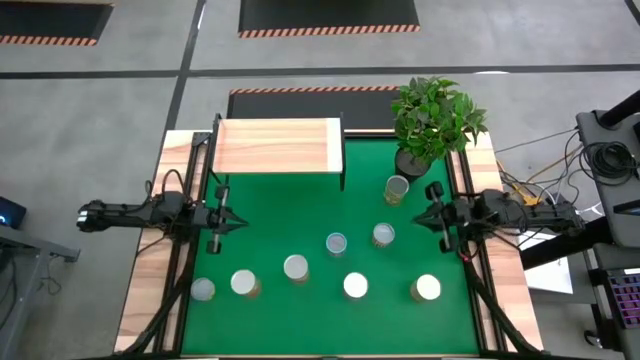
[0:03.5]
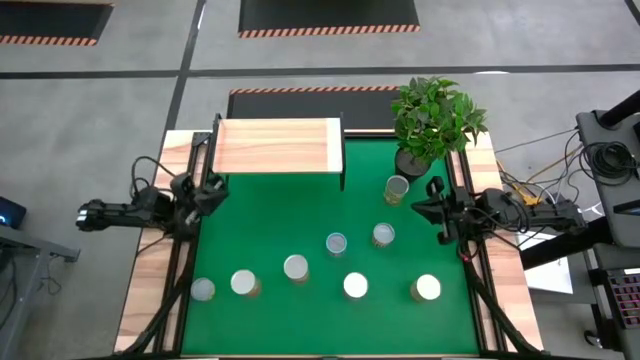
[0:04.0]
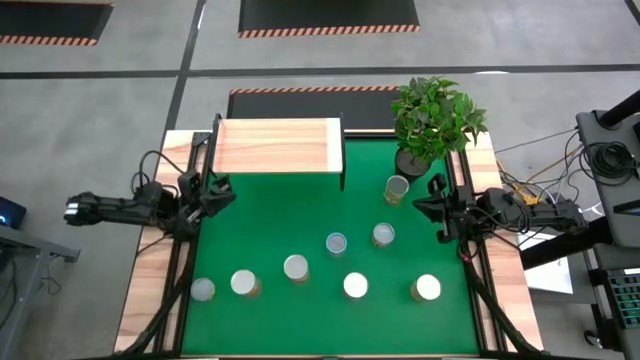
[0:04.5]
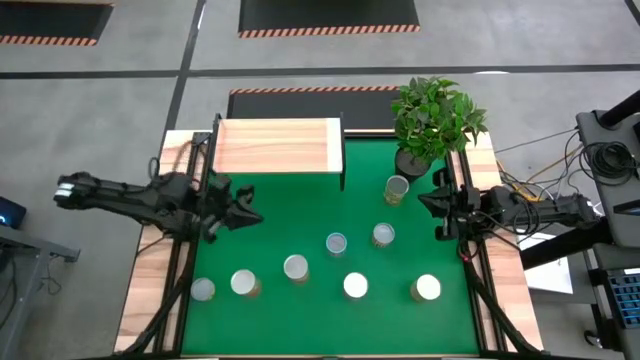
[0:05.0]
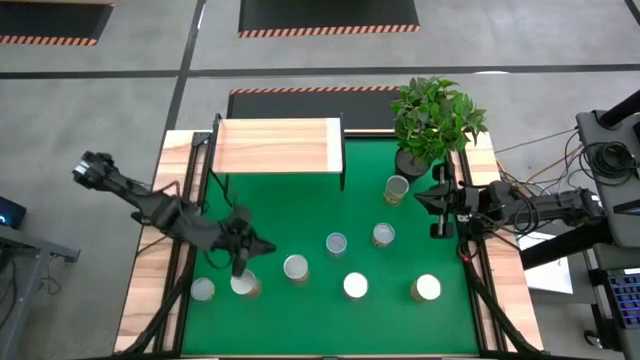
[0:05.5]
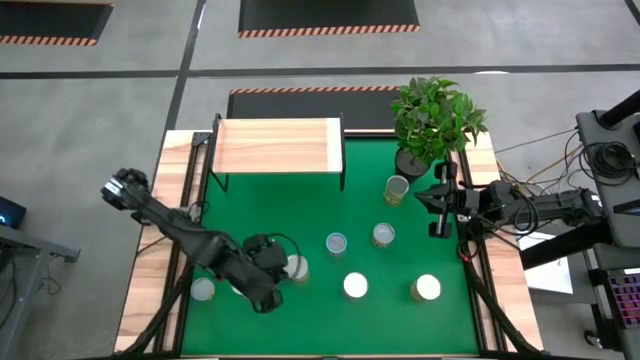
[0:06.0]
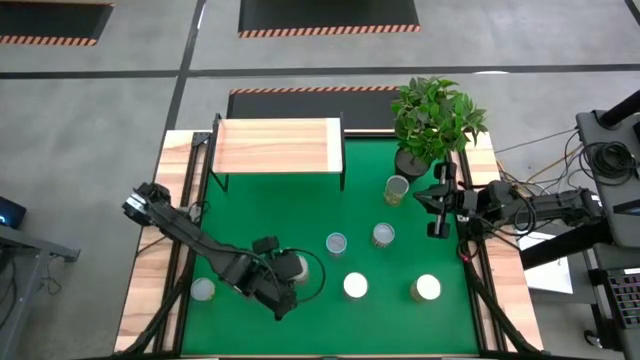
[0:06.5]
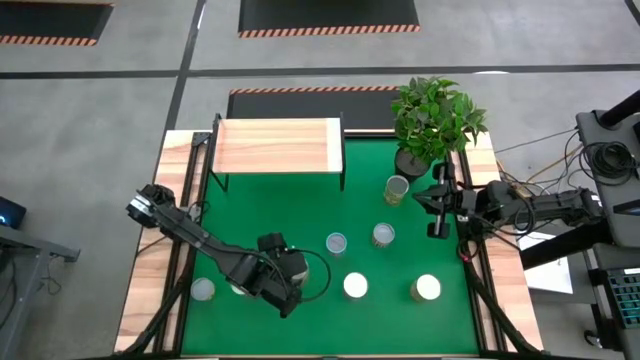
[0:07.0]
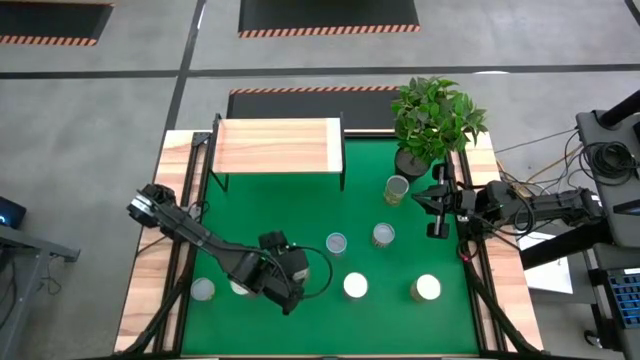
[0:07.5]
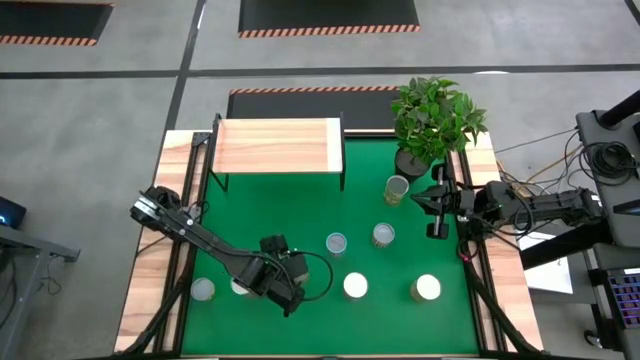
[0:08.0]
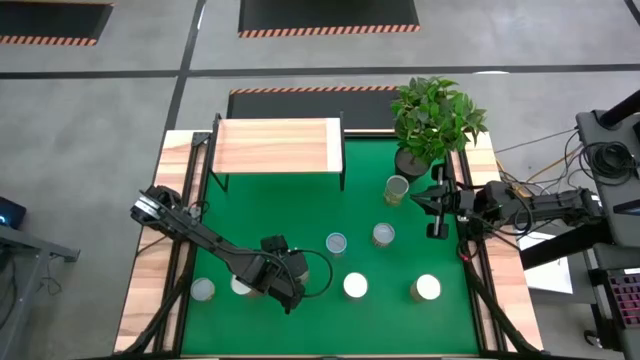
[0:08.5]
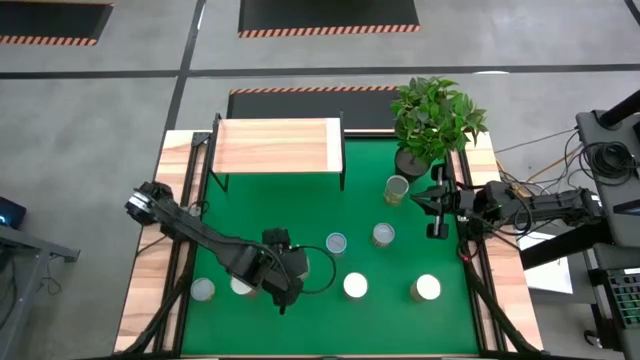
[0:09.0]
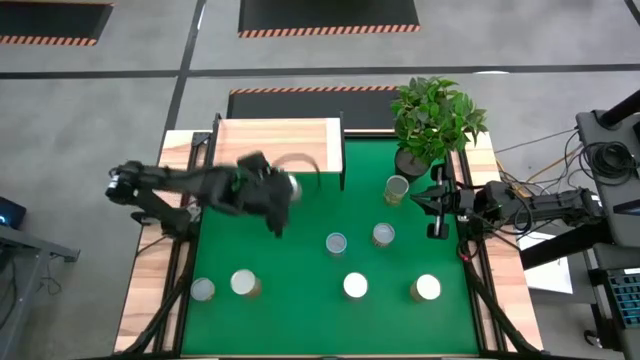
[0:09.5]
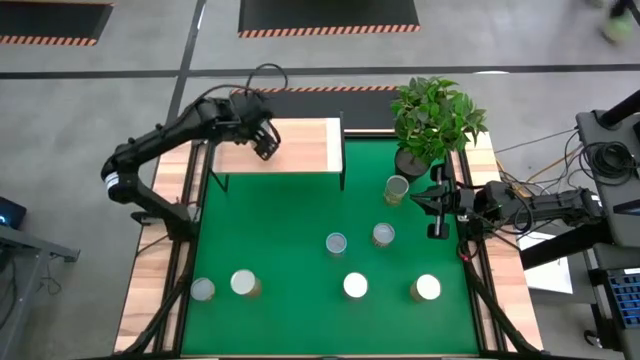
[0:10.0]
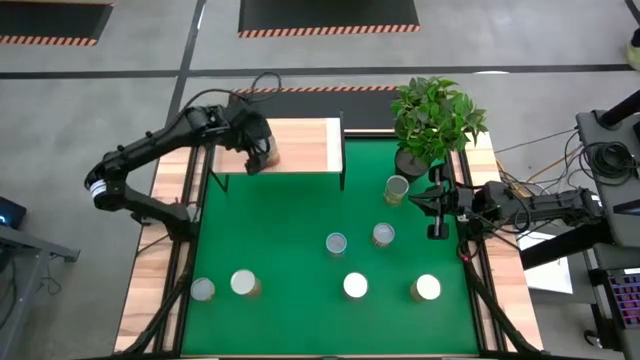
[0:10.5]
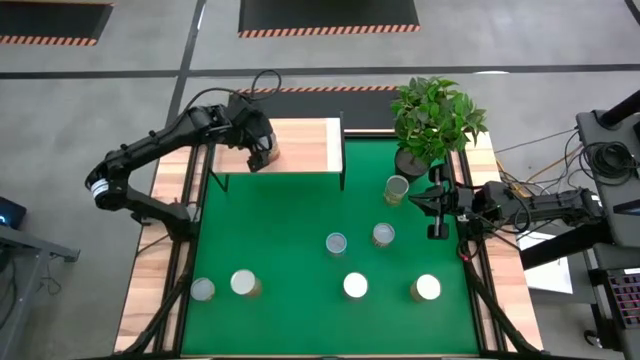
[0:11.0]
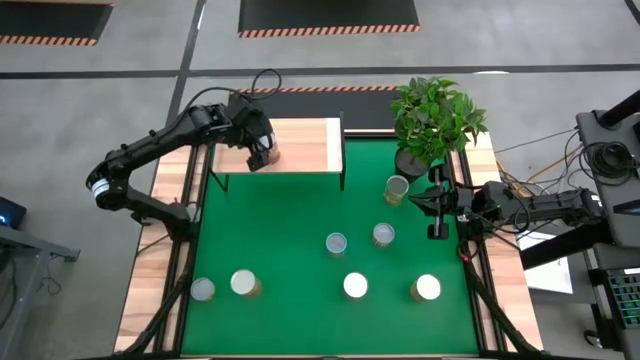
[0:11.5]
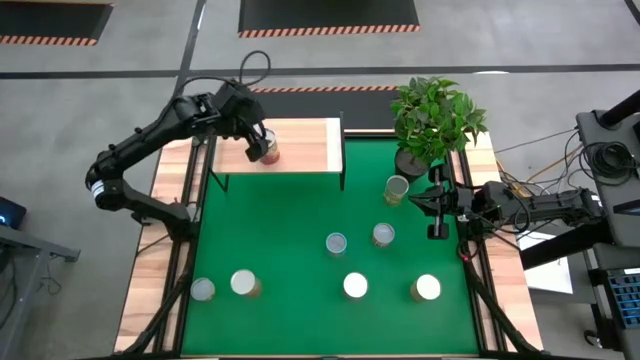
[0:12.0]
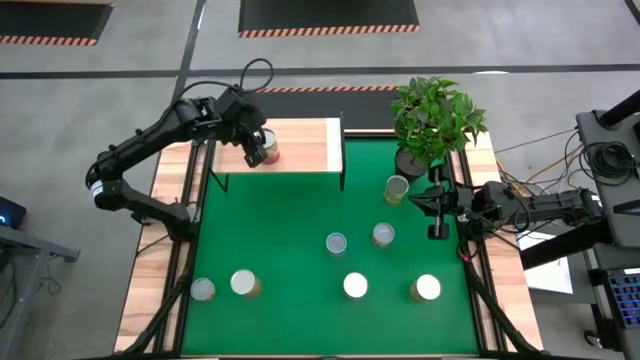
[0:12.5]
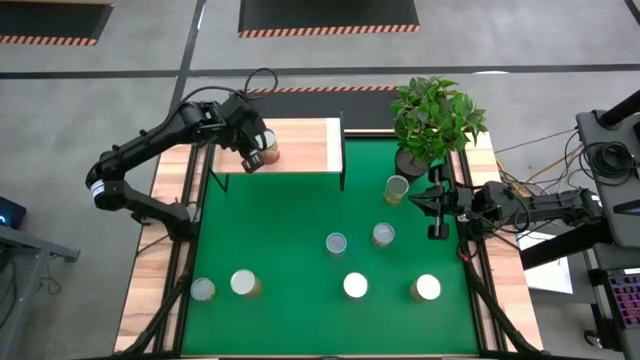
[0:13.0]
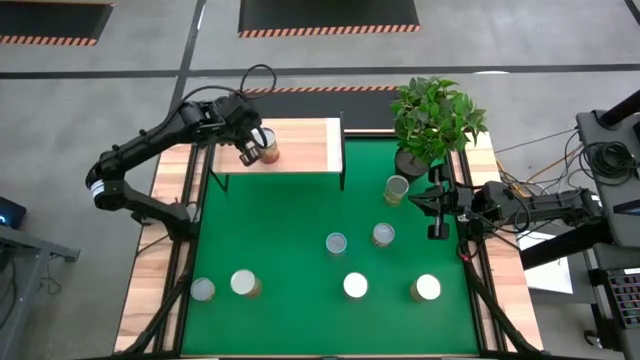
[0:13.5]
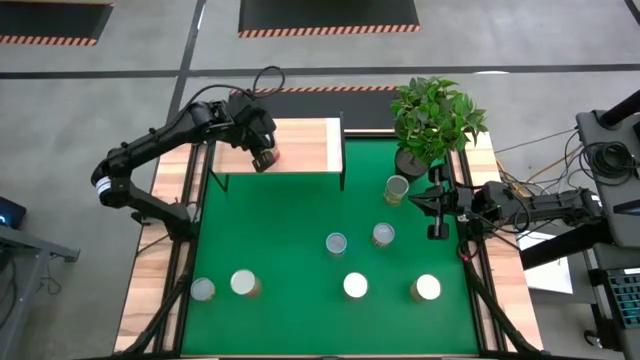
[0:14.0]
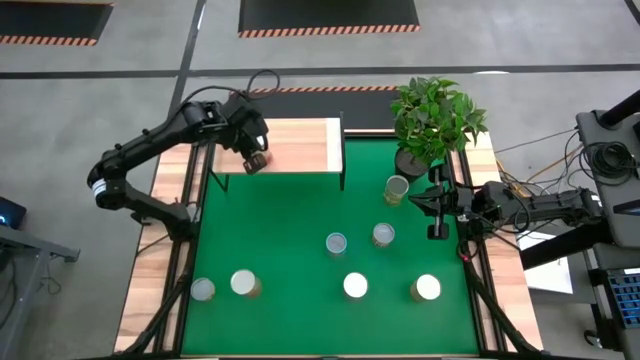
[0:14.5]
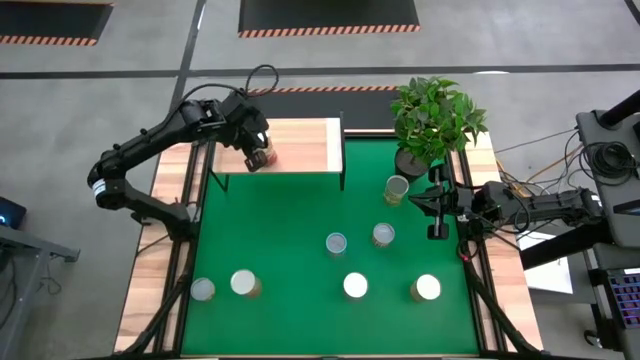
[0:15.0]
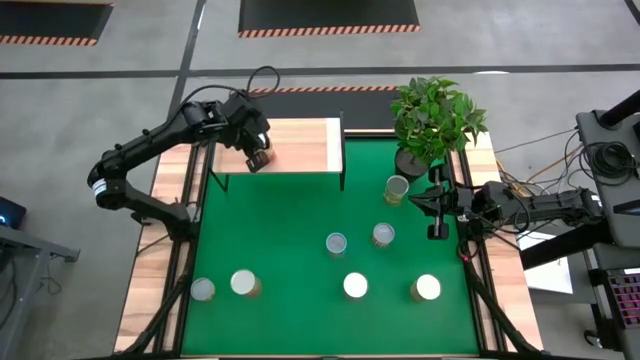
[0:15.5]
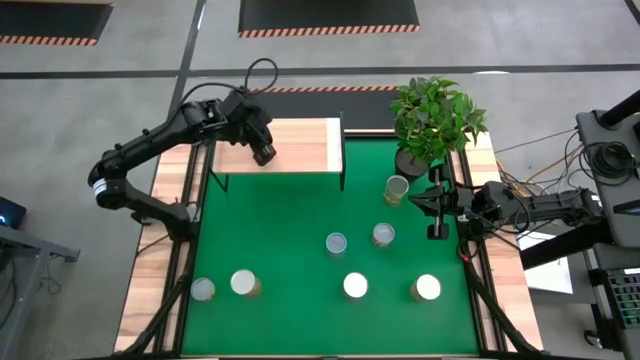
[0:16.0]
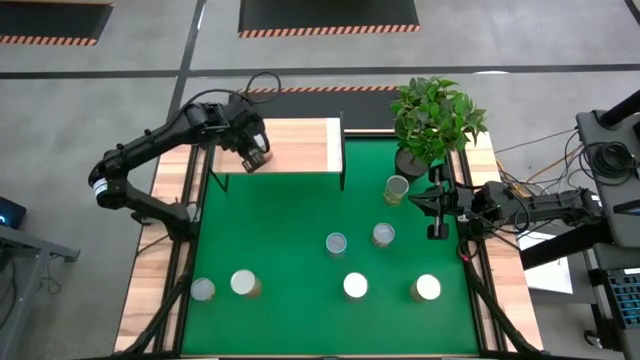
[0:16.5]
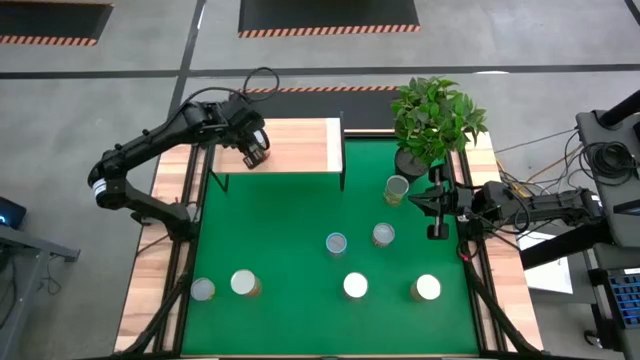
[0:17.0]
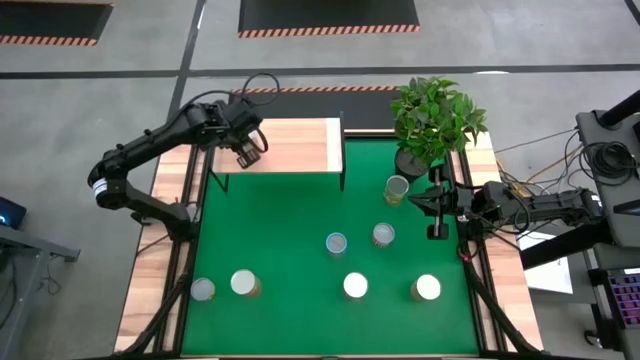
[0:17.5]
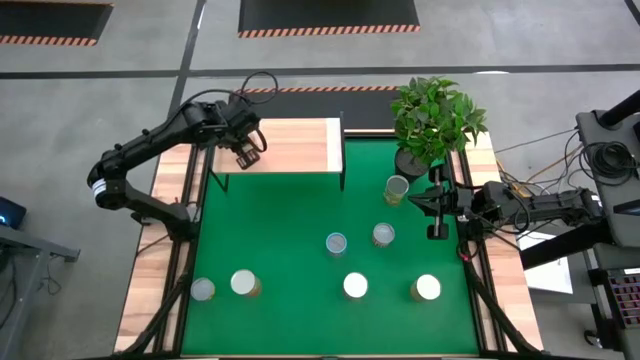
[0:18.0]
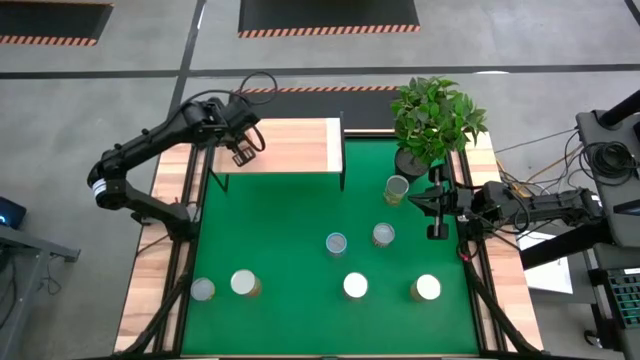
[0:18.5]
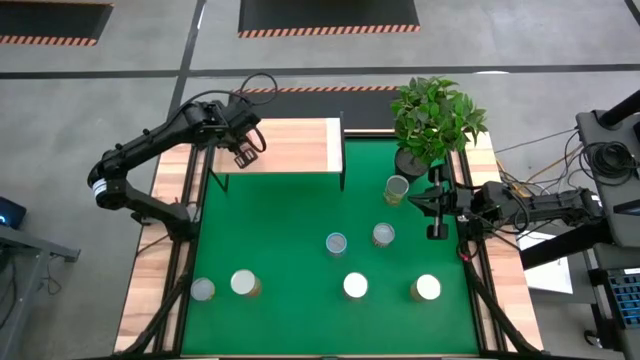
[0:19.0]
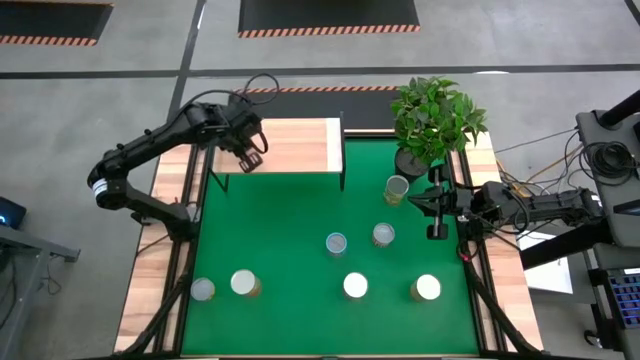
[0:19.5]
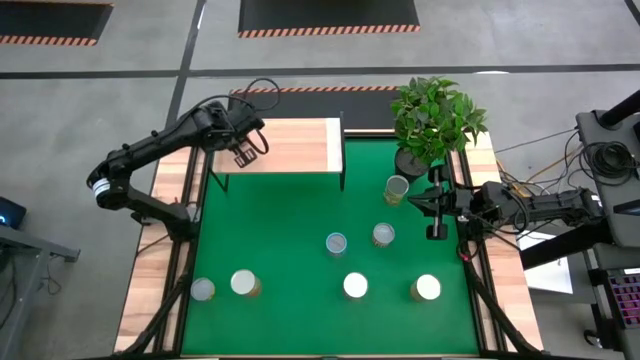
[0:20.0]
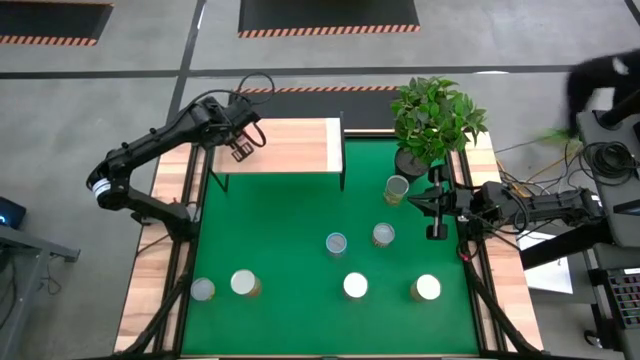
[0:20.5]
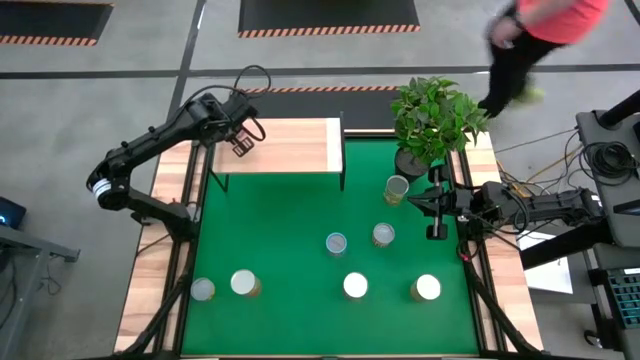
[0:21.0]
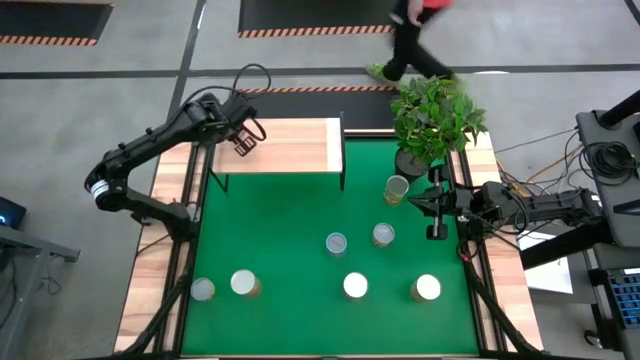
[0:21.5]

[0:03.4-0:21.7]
Task: Pick and place cans onto a shelf
Put the center left orange can on the shelf

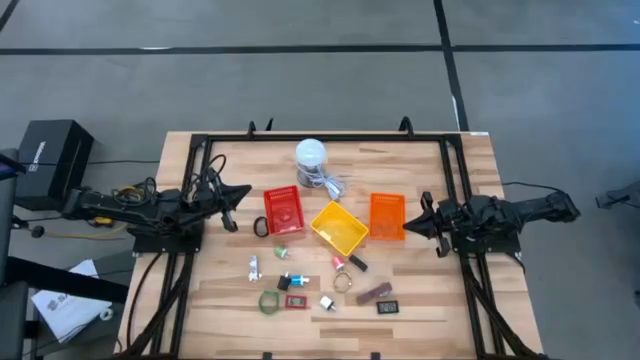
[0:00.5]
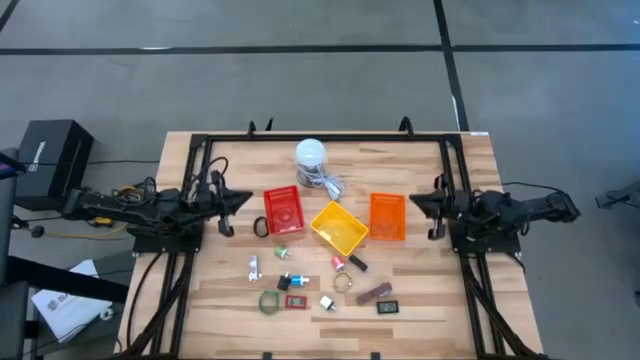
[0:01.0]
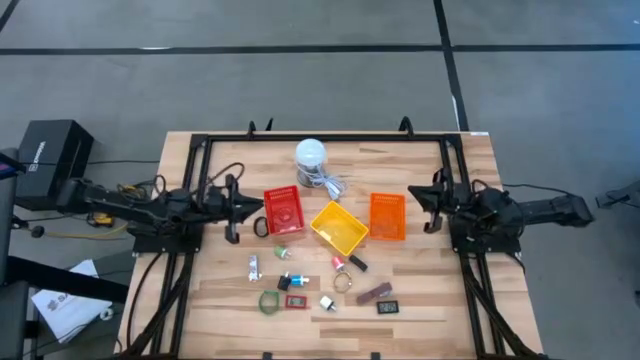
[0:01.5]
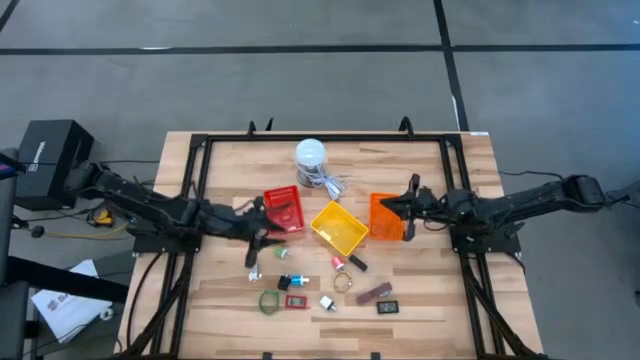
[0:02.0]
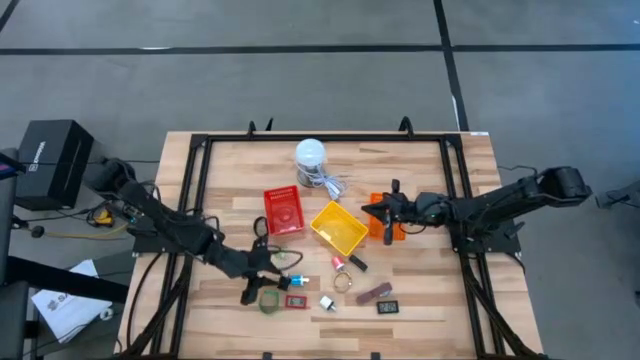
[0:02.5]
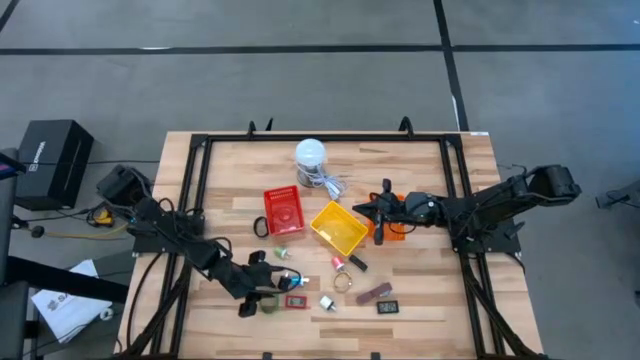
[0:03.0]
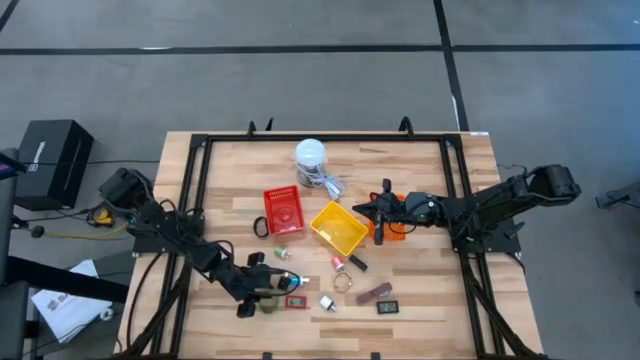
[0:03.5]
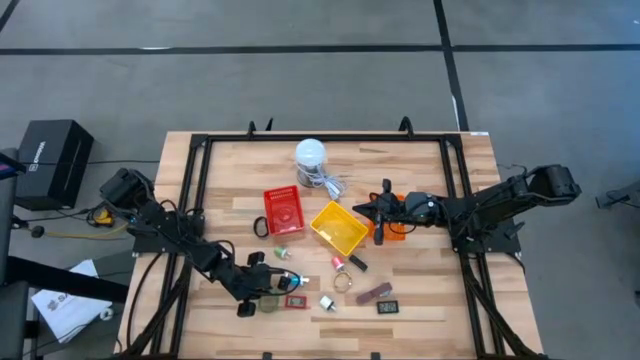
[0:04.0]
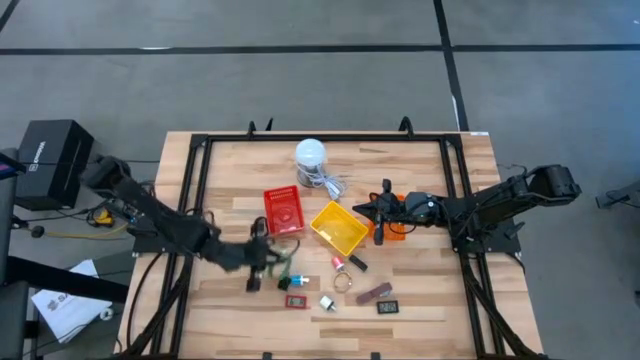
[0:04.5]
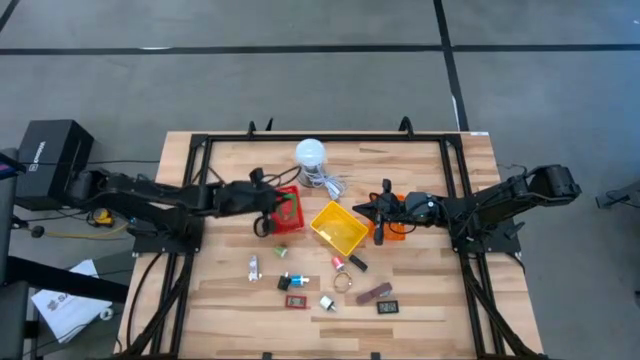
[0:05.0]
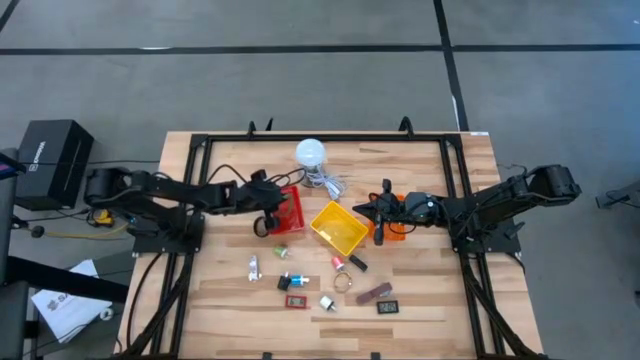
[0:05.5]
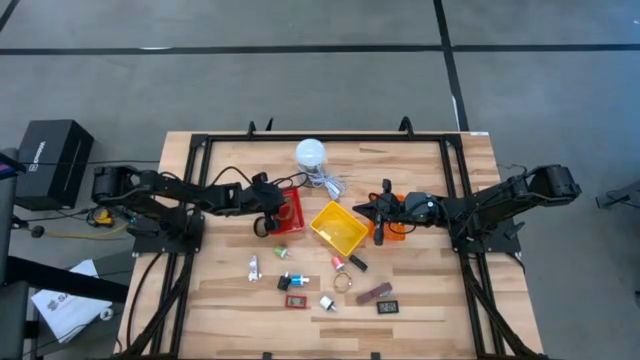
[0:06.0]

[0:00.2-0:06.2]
Task: Pick & Place Office items
Put the green watch into the red basket
